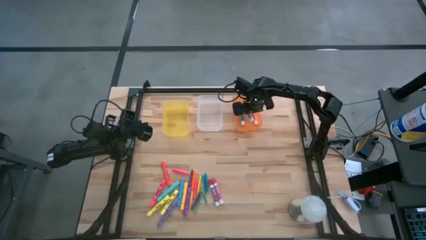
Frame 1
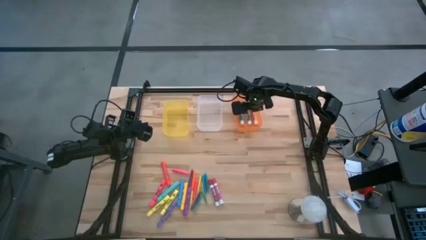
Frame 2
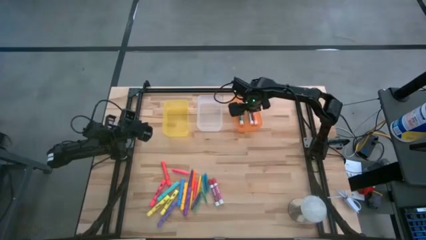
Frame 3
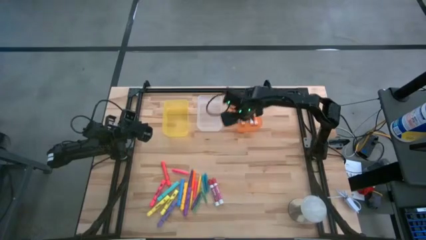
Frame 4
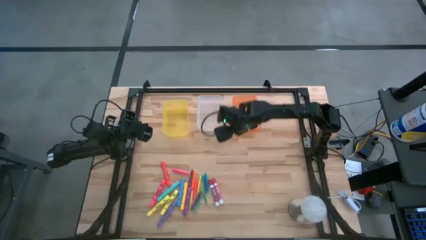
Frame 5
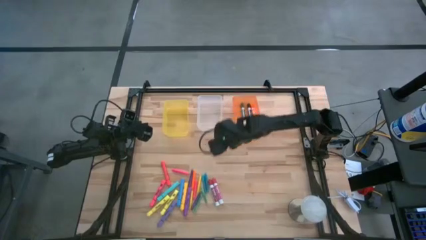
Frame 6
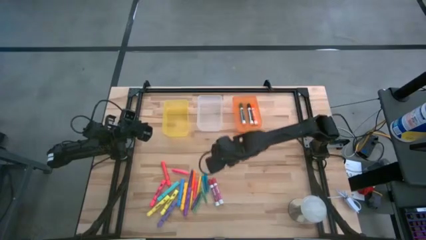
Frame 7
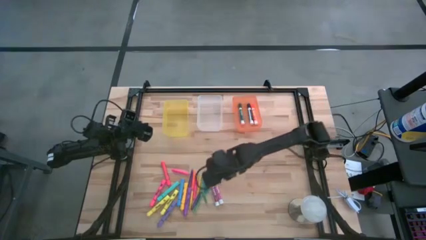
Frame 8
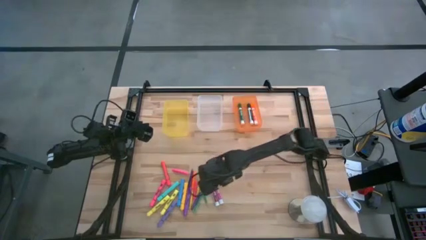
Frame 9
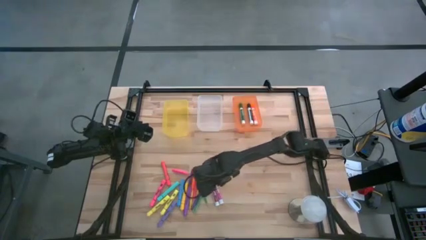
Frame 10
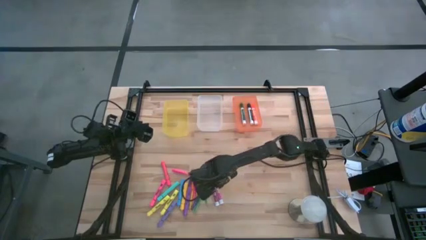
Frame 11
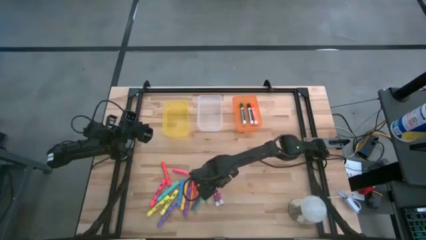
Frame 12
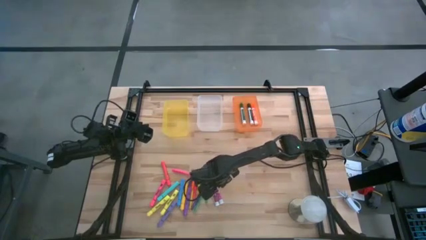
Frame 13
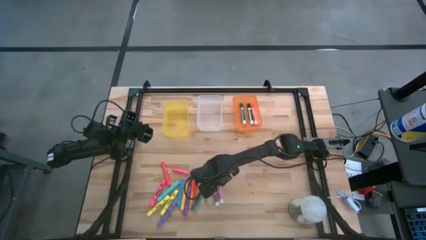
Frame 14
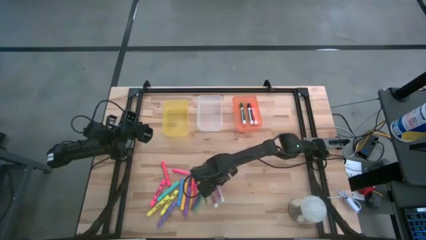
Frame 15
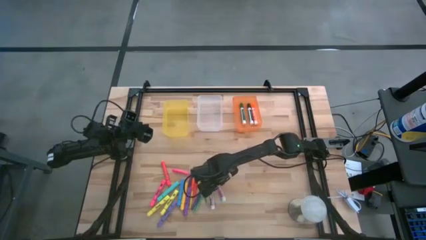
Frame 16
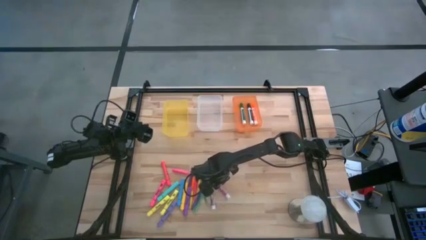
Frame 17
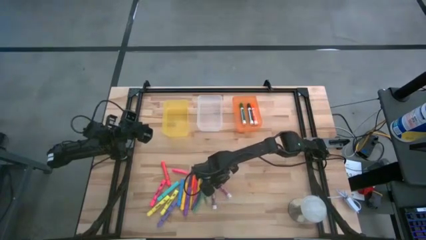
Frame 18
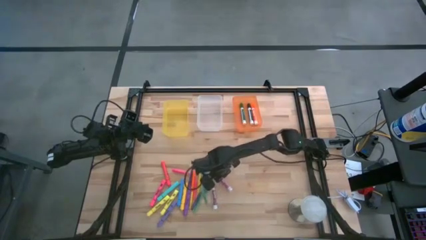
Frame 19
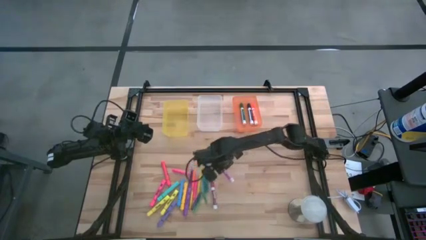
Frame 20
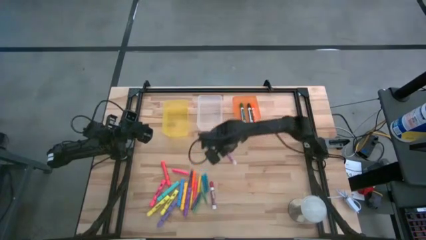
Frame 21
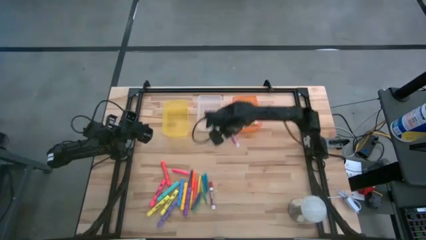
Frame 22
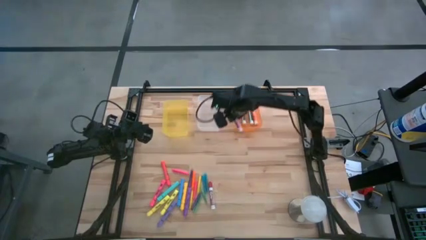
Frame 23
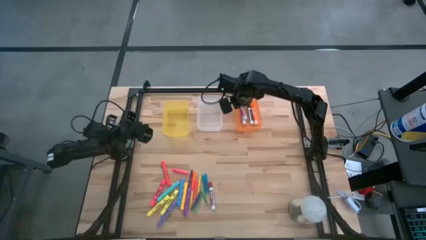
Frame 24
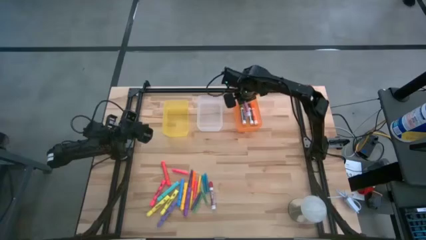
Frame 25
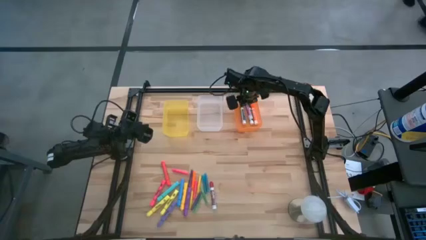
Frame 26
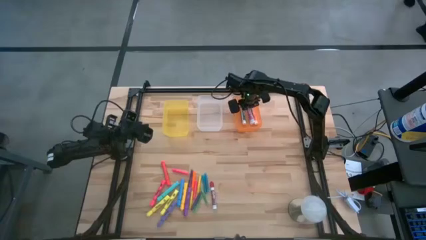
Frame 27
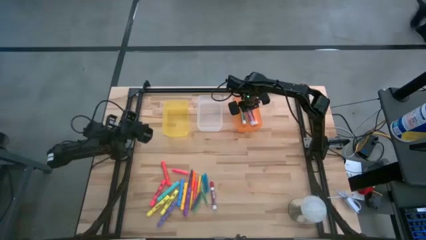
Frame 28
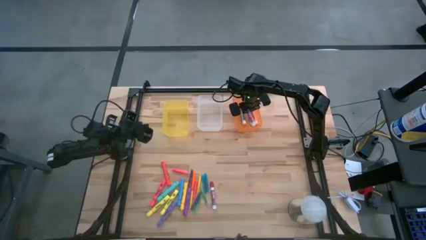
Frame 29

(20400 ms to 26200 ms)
Task: Pick & Place Markers
Put the pink marker pen into the orange bin

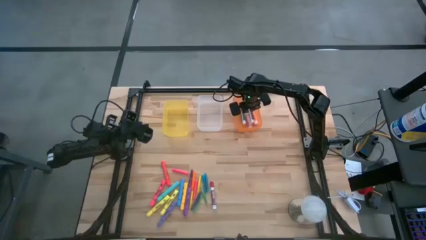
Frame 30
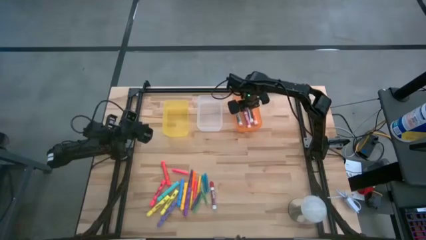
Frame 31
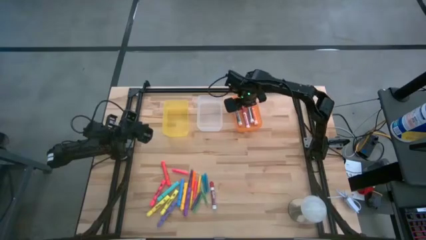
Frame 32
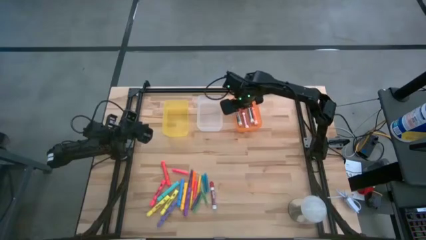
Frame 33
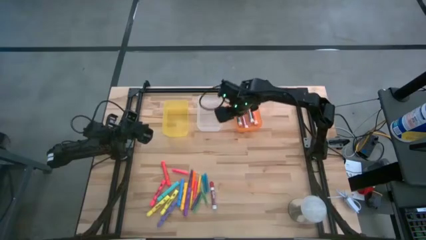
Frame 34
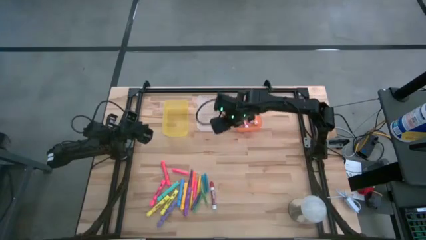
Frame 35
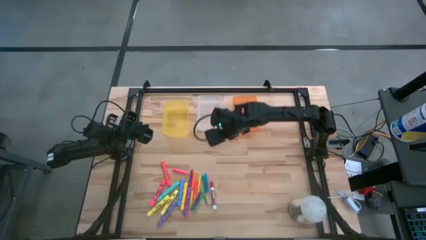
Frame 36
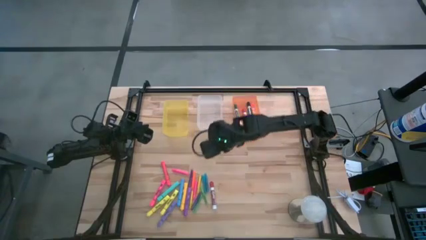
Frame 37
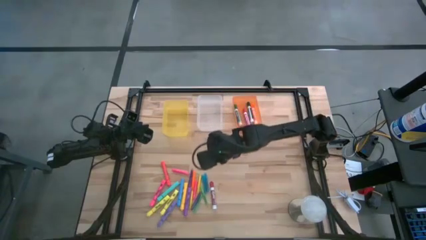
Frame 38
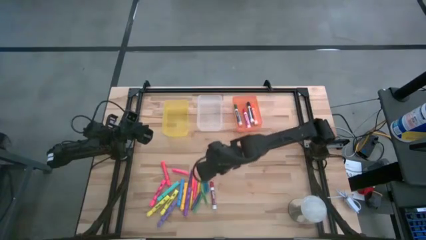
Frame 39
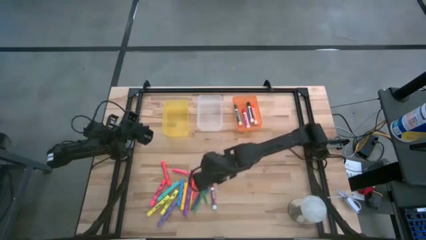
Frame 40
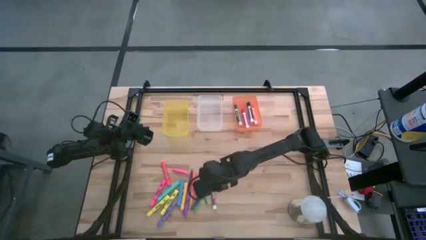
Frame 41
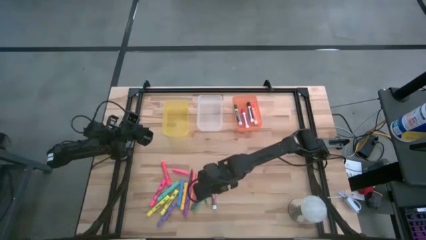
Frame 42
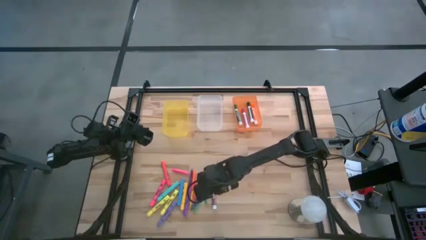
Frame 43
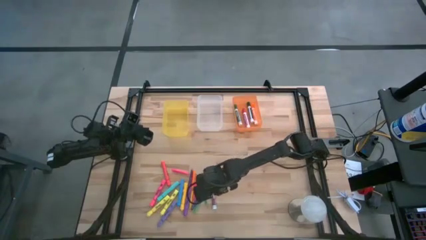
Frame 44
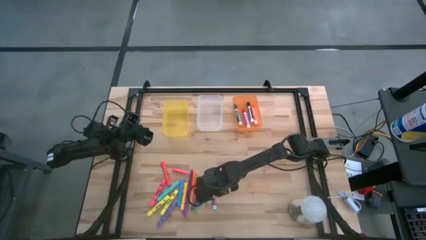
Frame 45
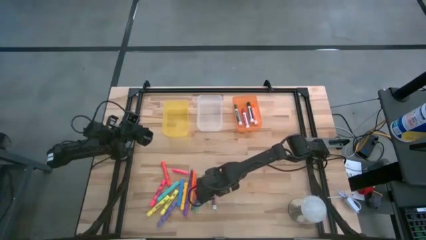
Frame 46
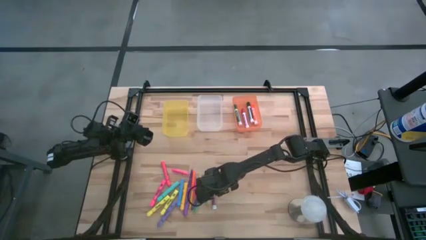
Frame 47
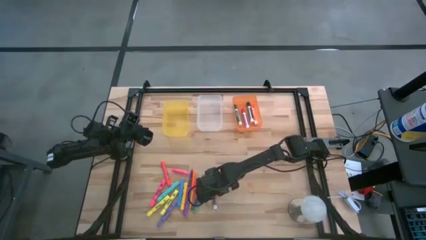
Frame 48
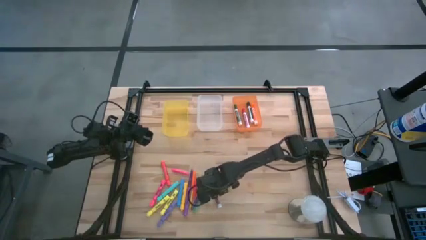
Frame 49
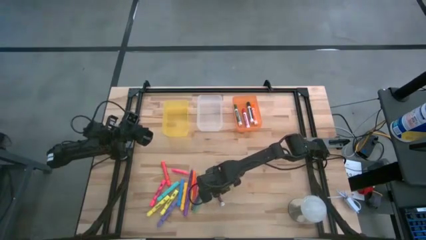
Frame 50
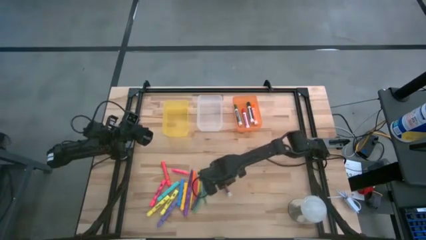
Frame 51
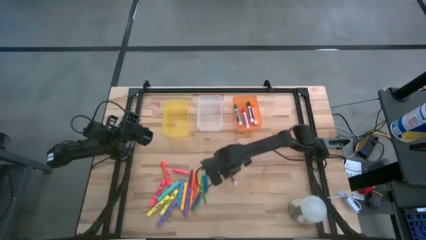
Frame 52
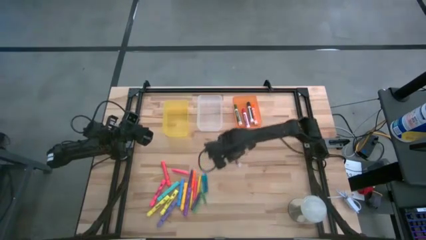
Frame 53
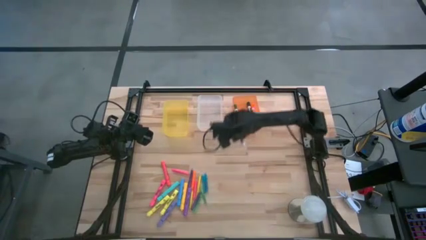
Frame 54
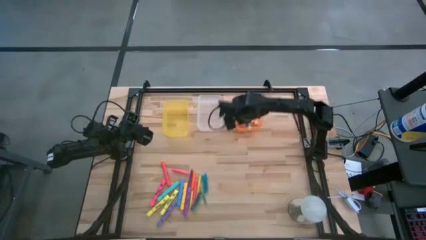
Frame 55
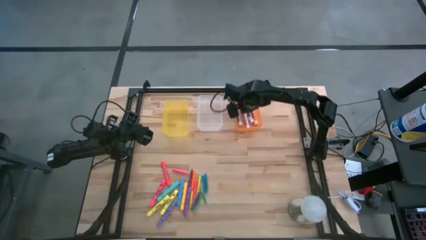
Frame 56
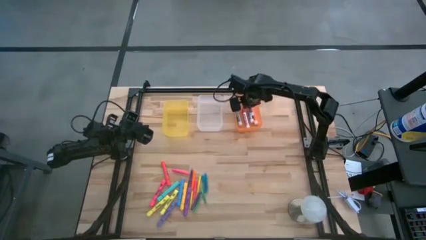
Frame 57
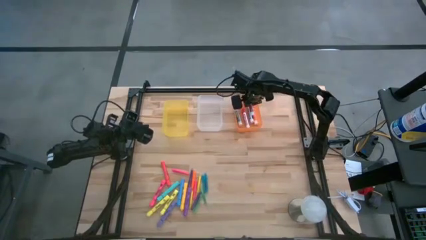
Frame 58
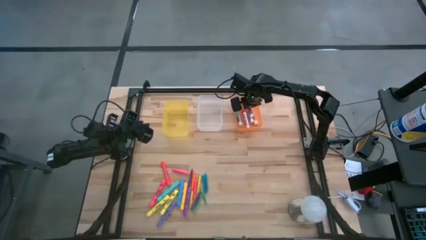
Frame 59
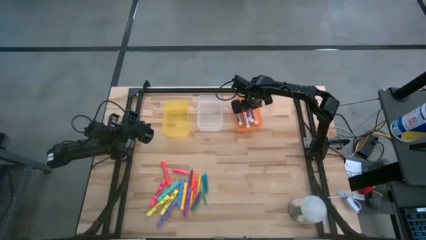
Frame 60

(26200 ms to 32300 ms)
Put the red marker pen into the orange bin

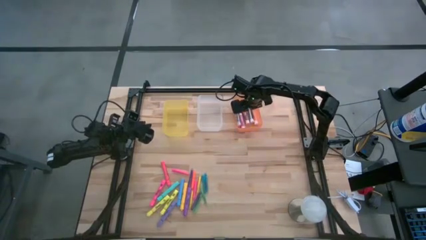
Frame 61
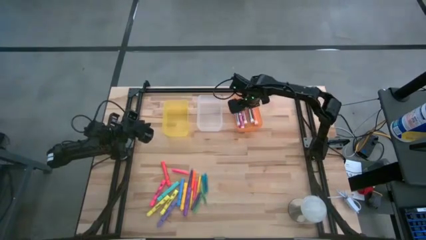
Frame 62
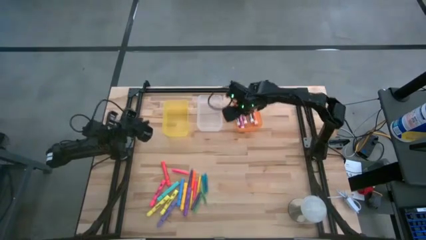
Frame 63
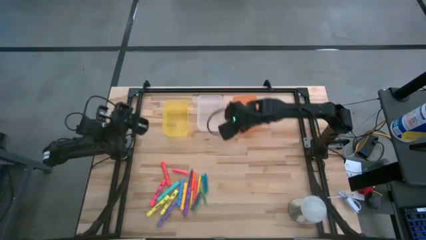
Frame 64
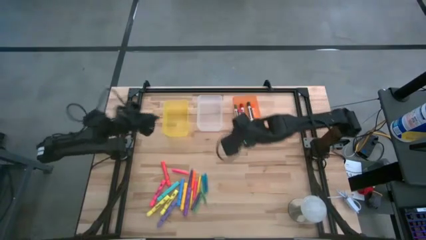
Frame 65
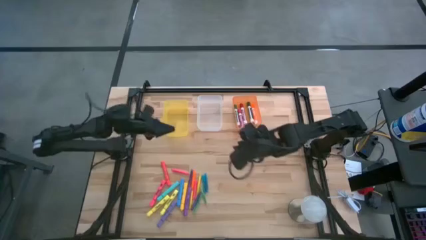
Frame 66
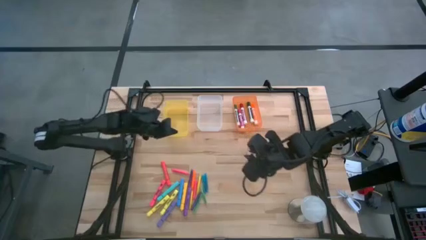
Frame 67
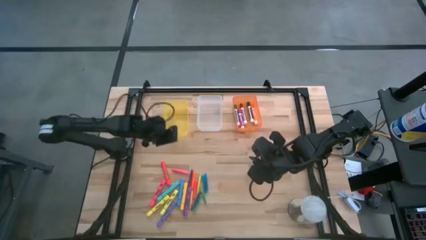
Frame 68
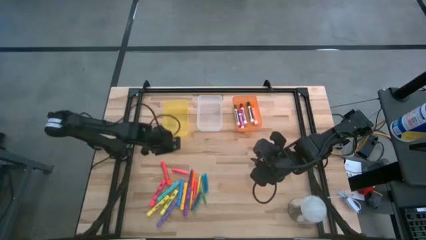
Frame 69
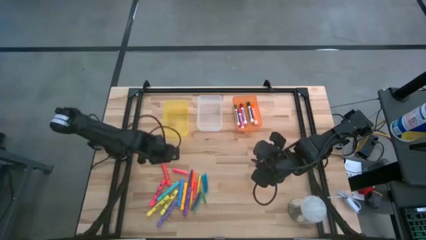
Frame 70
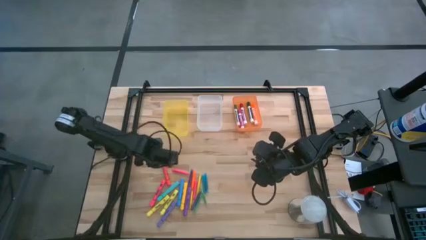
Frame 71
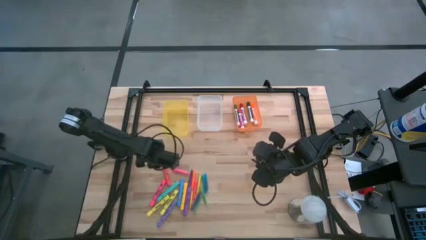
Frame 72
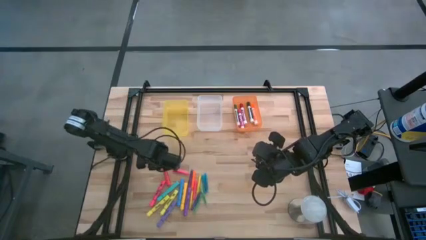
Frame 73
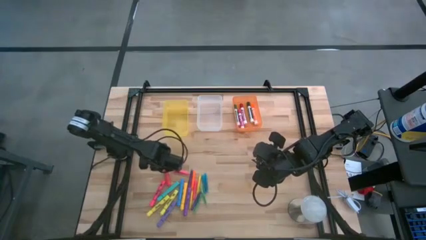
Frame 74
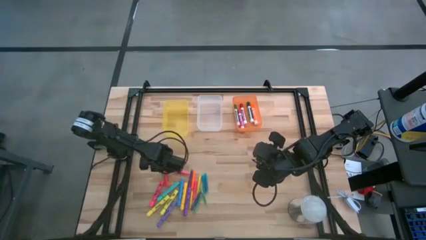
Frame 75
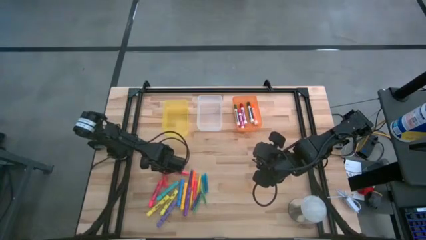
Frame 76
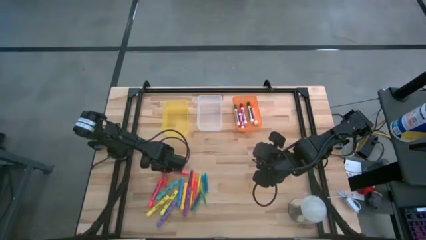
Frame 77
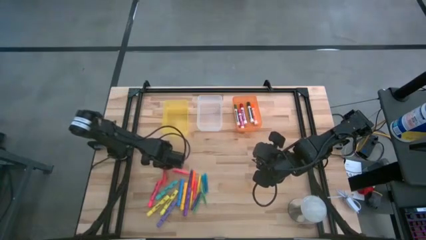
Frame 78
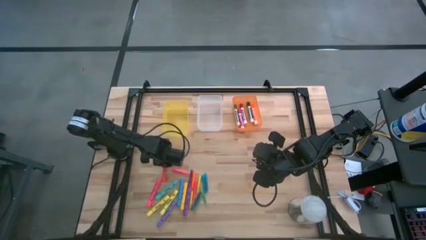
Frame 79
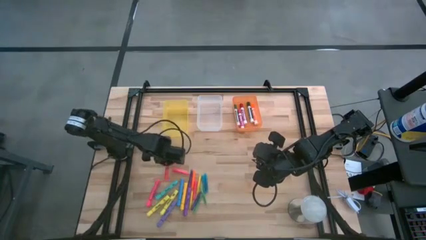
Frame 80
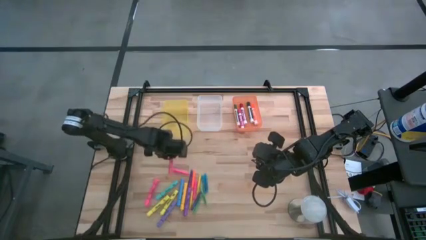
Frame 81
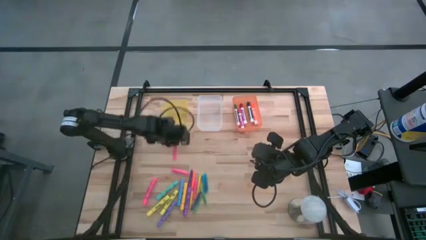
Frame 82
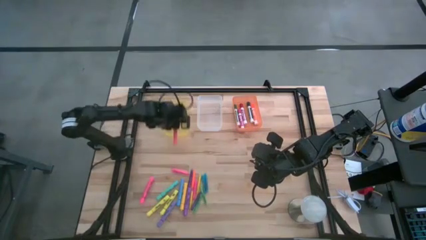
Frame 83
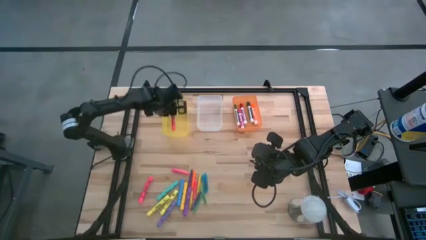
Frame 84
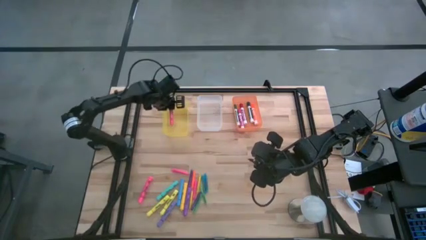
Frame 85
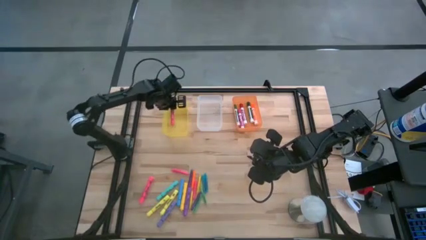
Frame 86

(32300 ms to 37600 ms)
Put the red highlighter pen into the yellow bin
